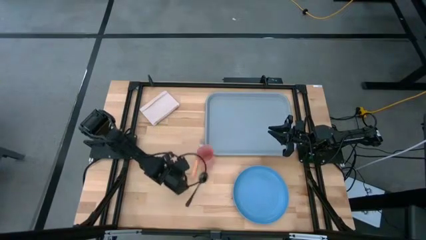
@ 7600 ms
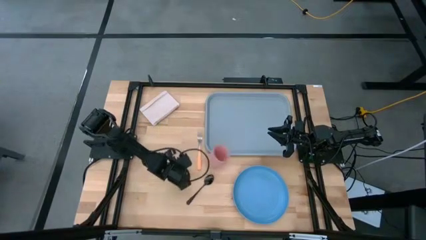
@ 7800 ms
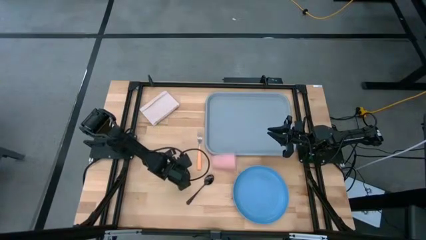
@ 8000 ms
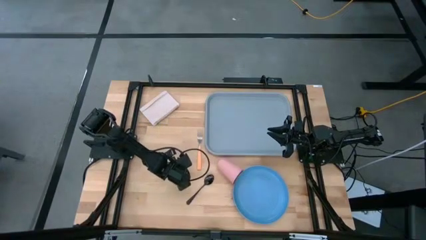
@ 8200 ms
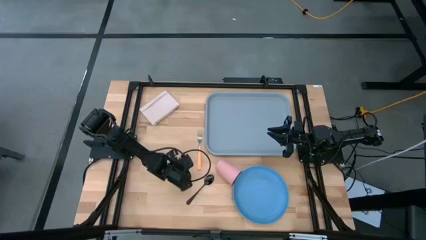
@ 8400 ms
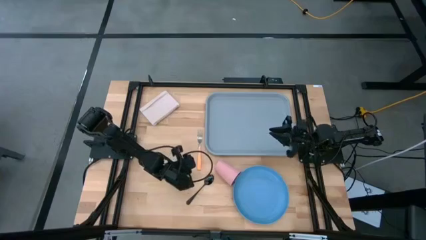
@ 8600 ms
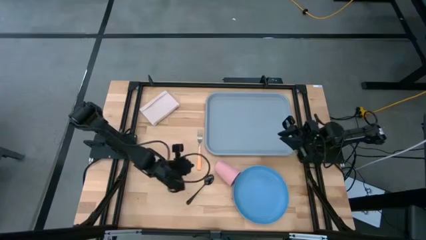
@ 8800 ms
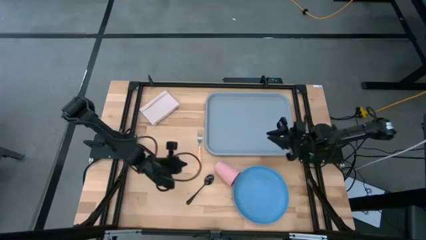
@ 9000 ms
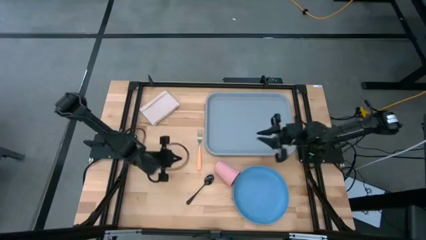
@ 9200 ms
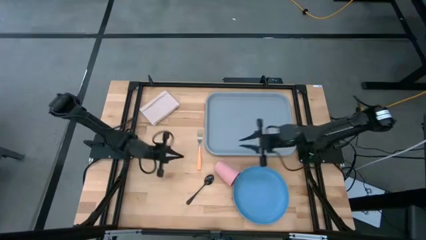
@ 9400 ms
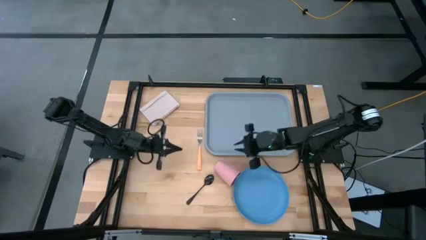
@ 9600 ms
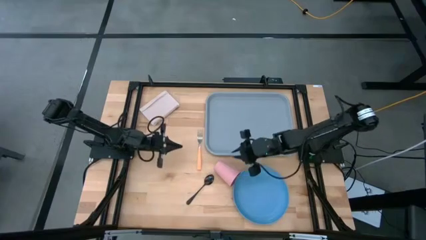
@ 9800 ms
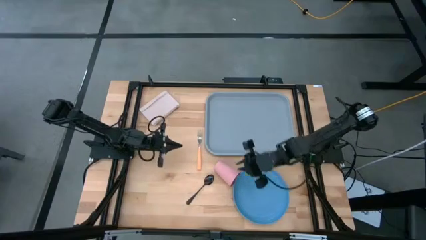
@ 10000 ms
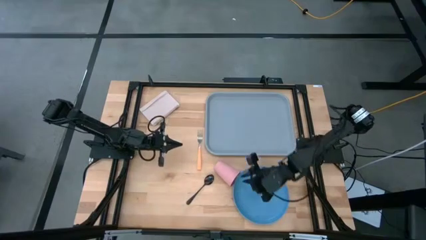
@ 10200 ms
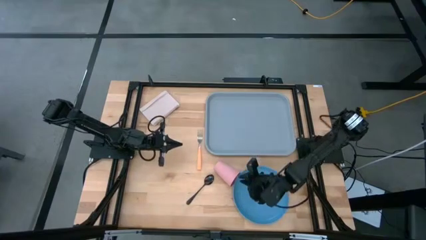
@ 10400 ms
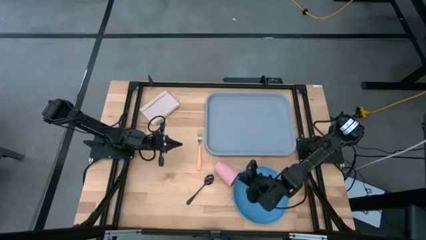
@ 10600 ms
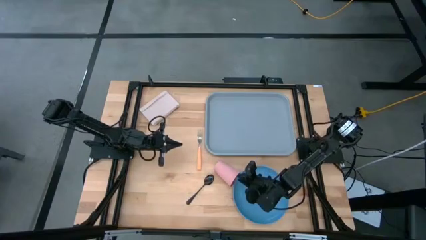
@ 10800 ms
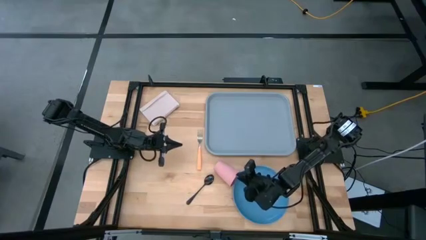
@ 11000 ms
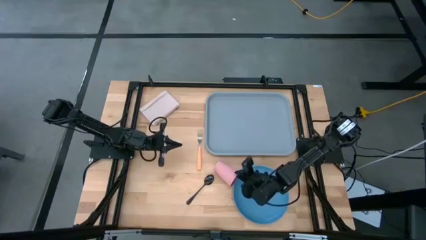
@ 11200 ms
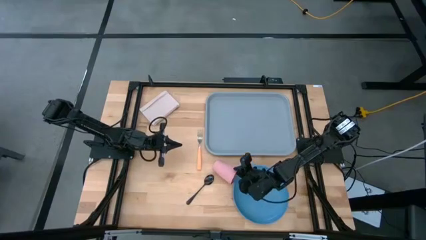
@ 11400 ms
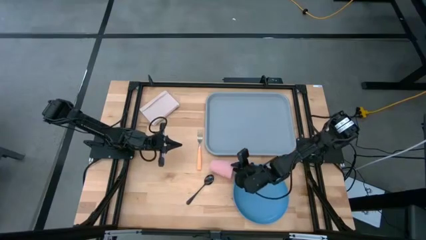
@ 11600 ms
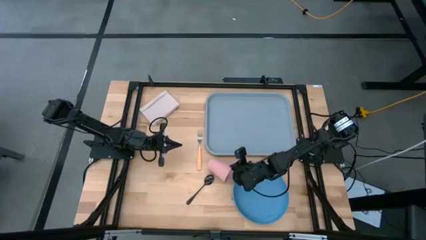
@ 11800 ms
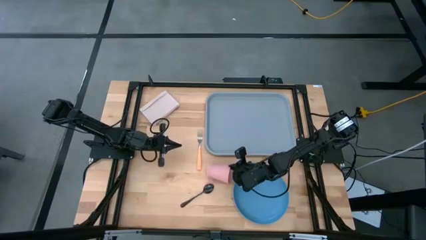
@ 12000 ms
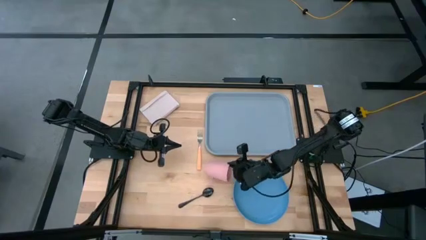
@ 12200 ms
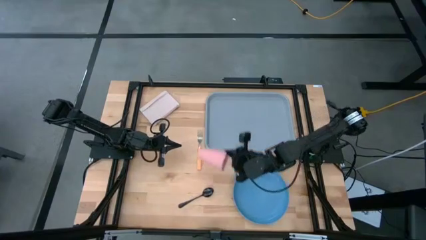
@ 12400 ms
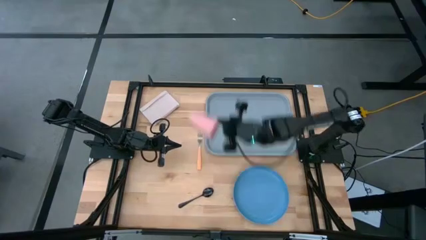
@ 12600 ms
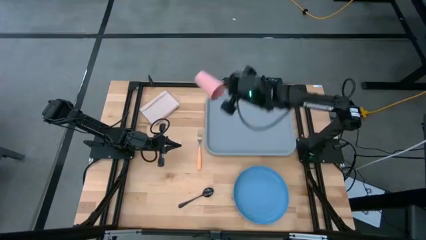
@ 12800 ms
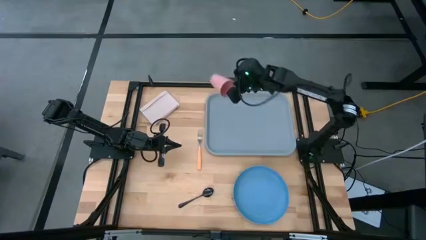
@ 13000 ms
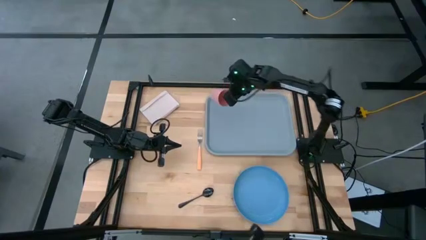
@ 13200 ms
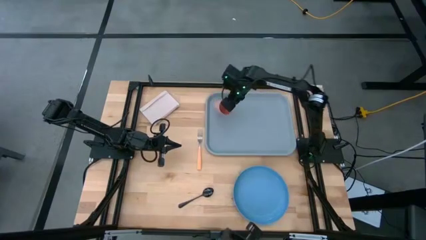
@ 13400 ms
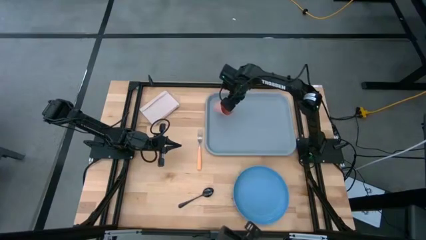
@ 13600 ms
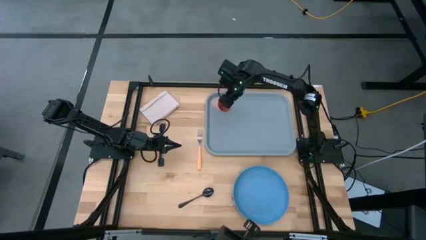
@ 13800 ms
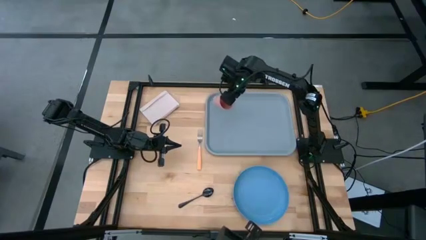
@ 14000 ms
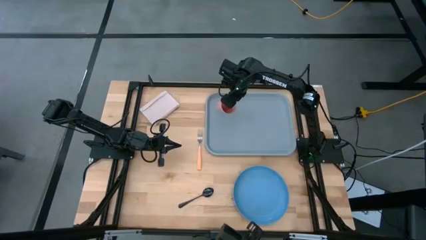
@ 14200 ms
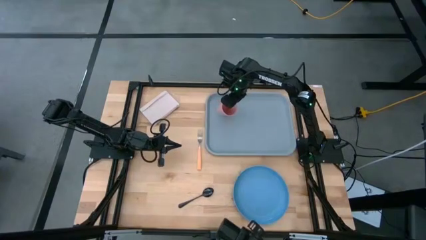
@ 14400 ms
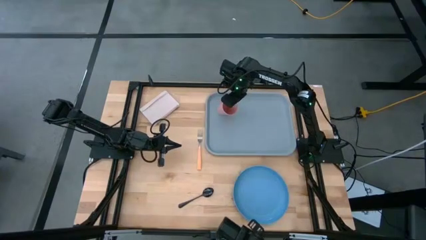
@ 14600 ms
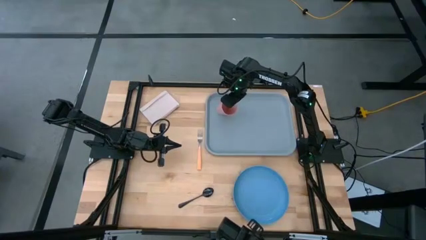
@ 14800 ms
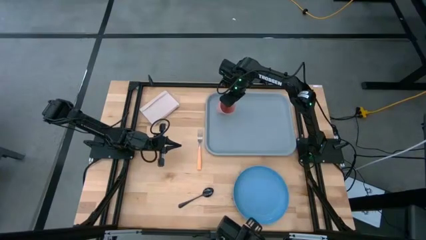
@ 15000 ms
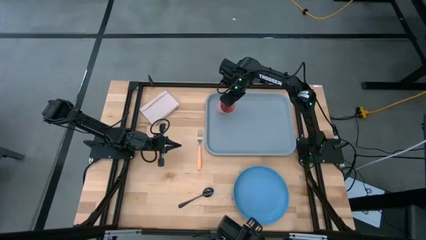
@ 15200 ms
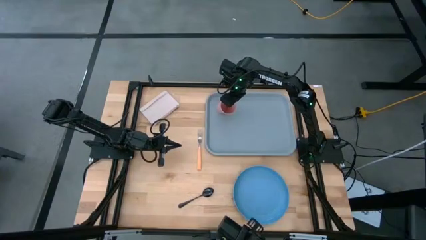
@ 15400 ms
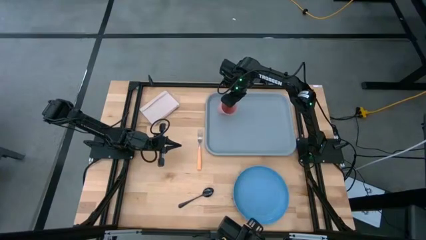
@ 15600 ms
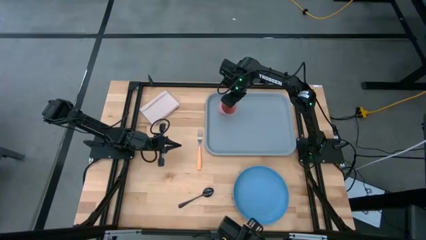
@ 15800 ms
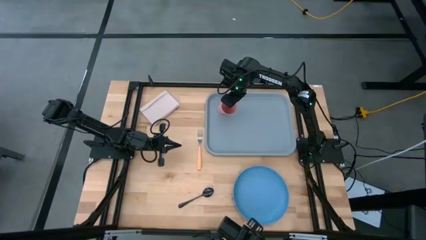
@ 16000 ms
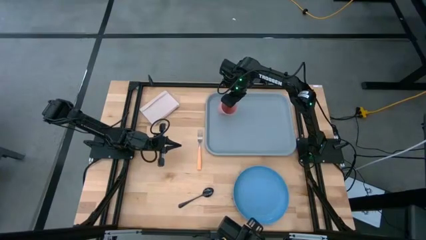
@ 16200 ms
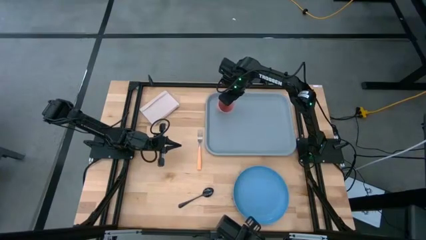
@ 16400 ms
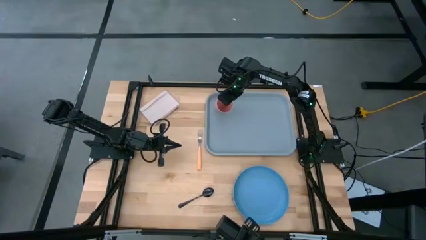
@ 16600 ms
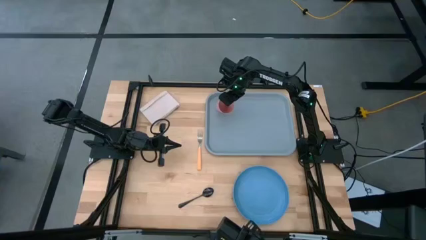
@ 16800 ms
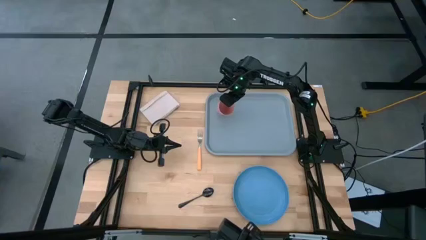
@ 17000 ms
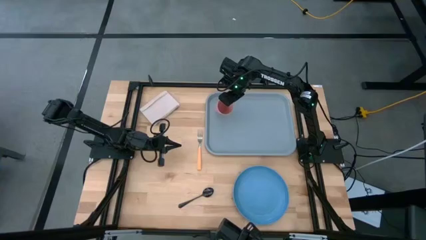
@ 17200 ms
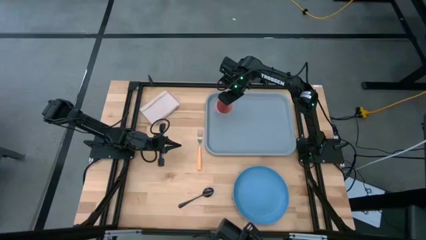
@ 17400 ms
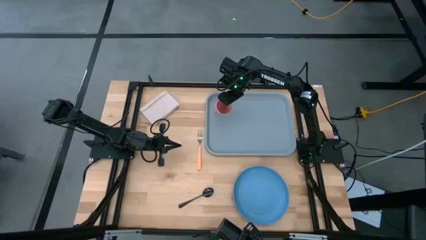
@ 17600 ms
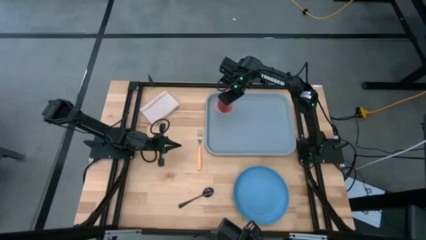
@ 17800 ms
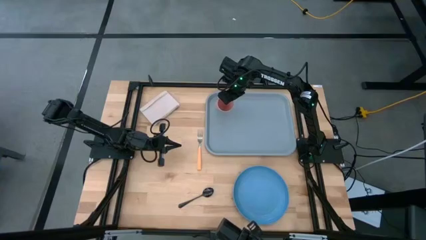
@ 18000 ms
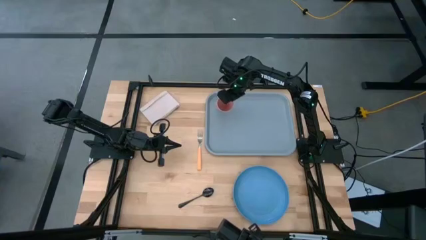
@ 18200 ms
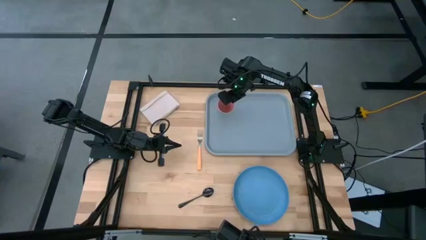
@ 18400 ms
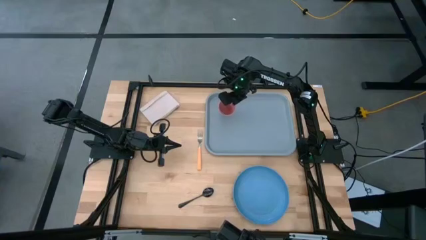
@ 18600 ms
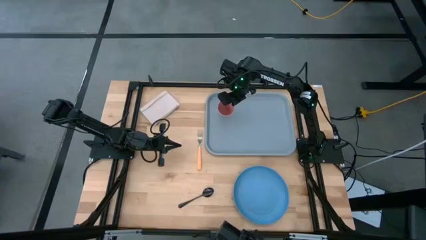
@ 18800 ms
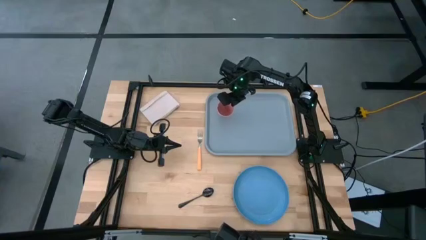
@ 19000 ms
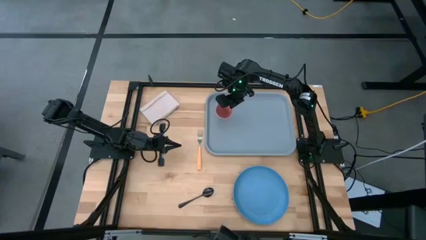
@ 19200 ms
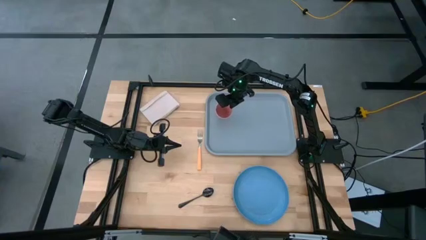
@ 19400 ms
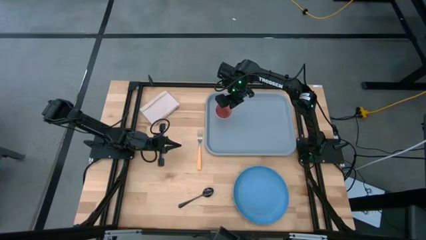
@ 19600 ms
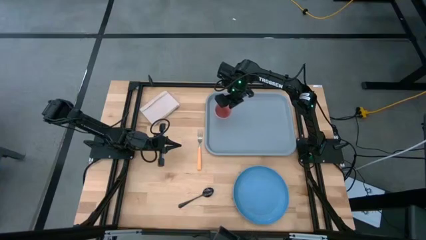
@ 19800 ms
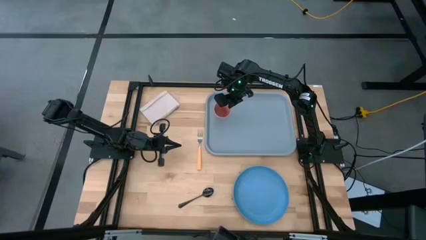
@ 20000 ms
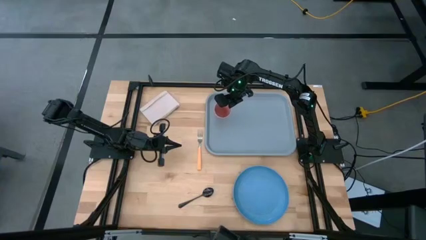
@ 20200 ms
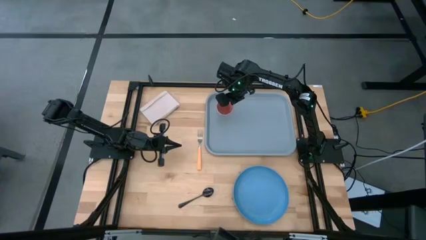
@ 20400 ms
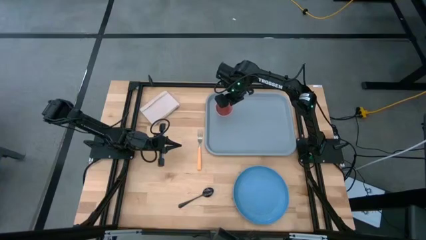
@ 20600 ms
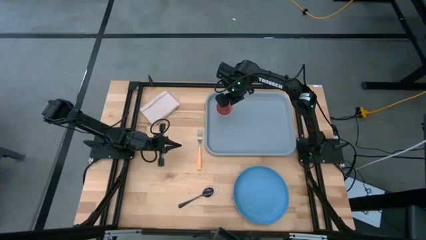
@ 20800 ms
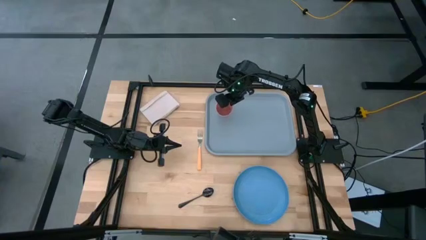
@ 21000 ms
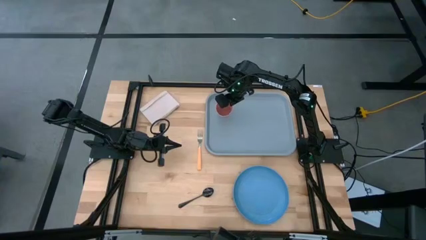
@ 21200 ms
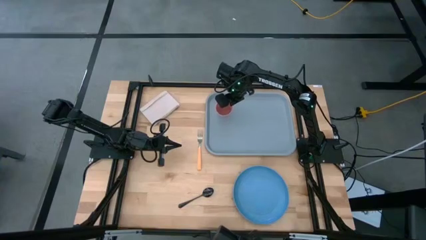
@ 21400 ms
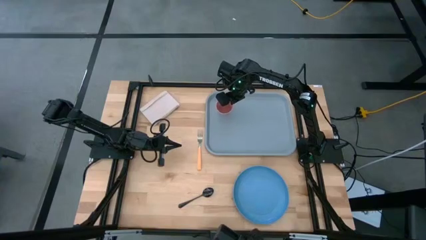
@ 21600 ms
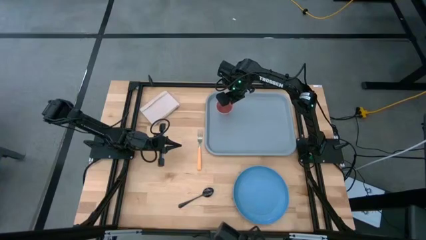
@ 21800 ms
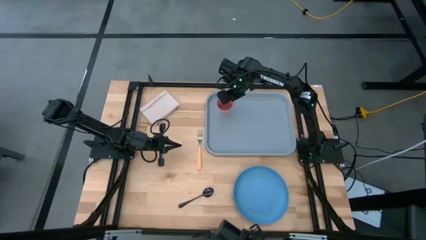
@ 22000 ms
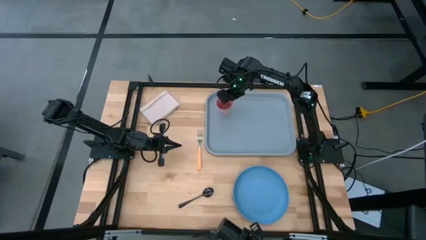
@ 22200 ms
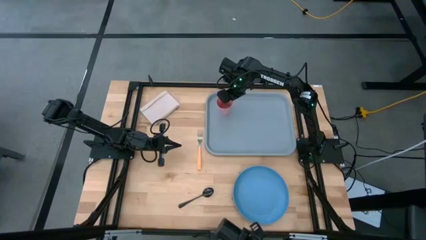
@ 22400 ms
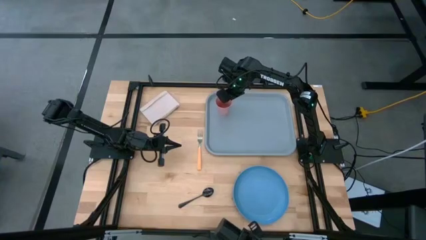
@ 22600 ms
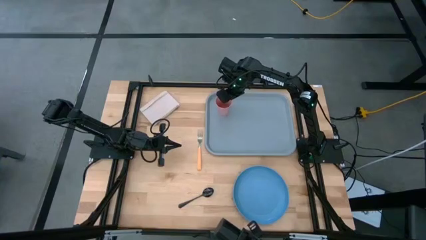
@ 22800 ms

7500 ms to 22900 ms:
Task: Pick and place plate/cup/fork/spoon on tray
Put the pink cup on the top left of the gray serving tray
